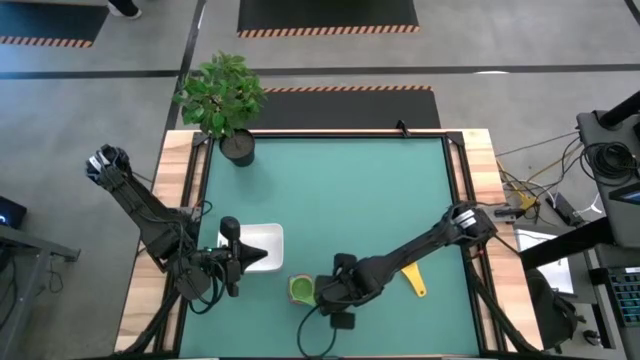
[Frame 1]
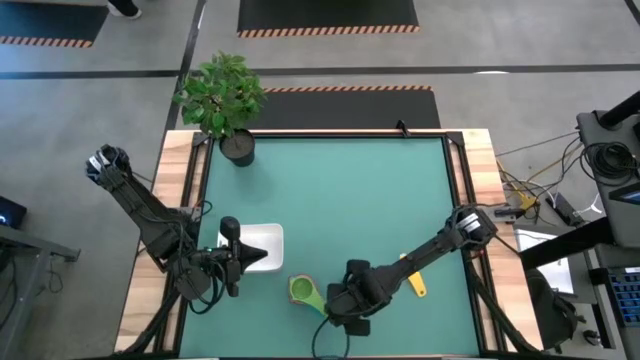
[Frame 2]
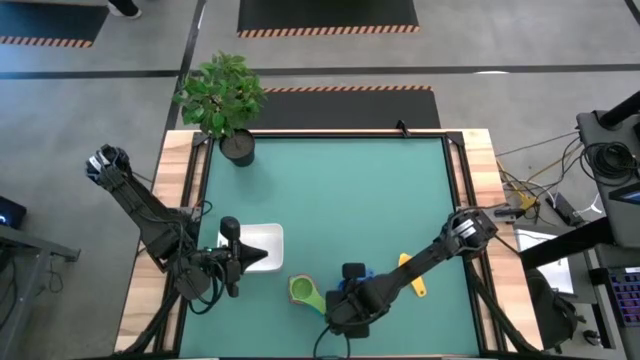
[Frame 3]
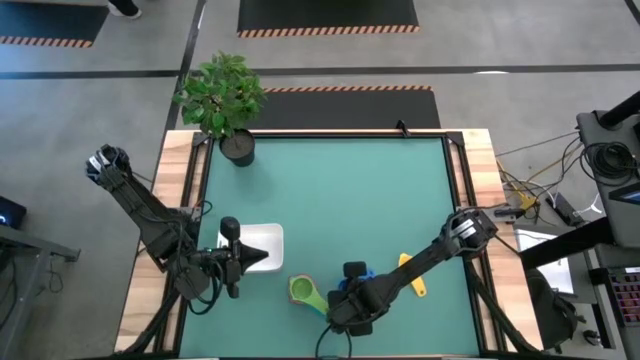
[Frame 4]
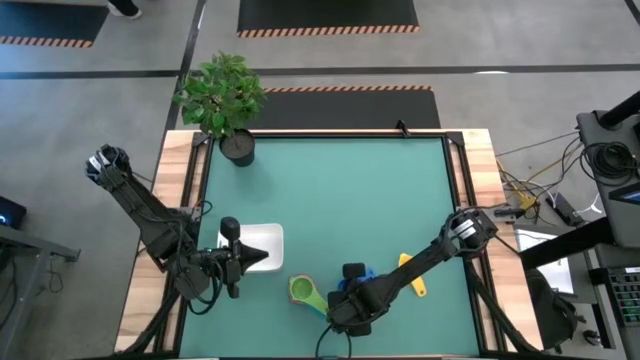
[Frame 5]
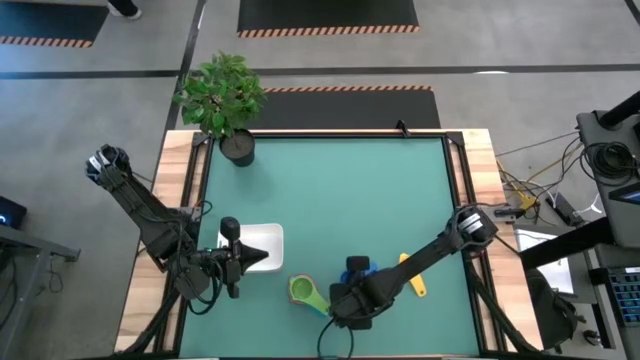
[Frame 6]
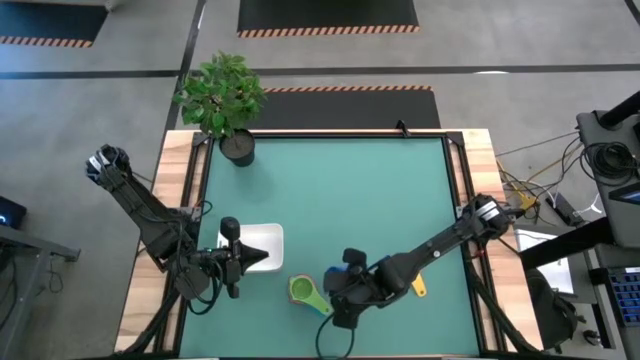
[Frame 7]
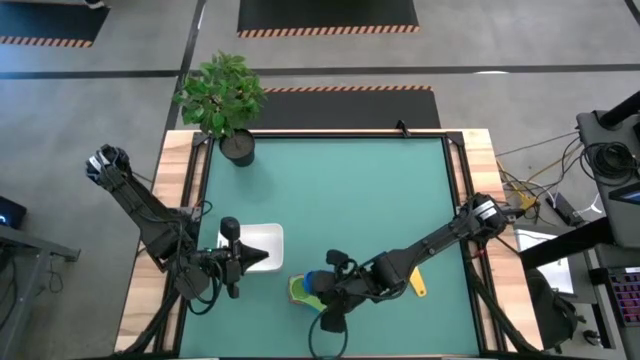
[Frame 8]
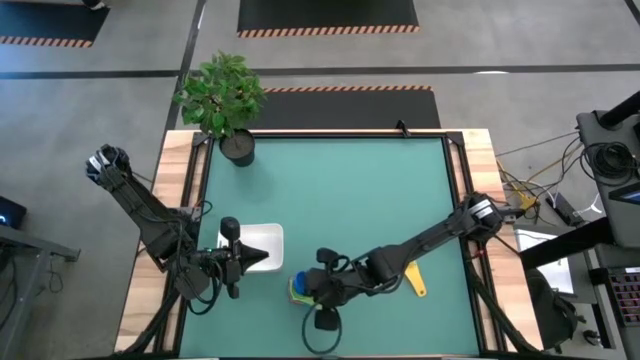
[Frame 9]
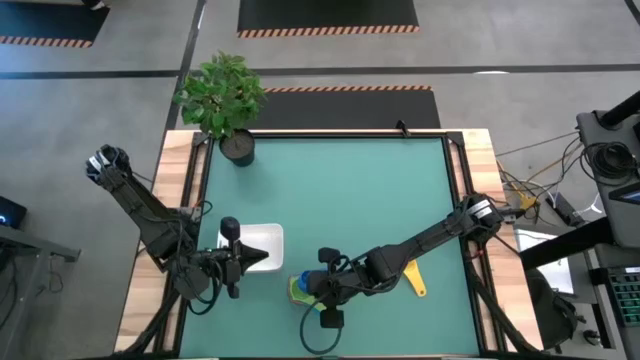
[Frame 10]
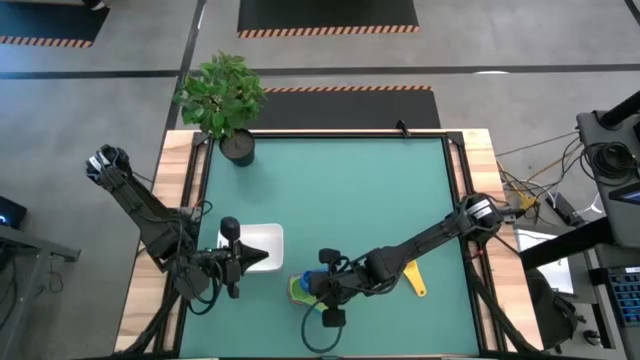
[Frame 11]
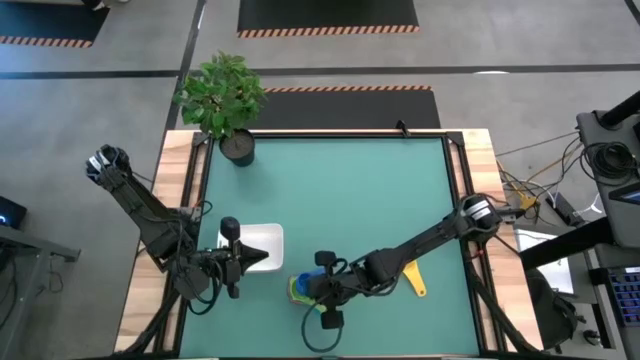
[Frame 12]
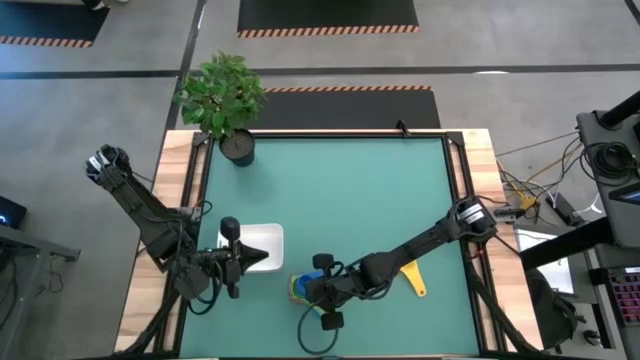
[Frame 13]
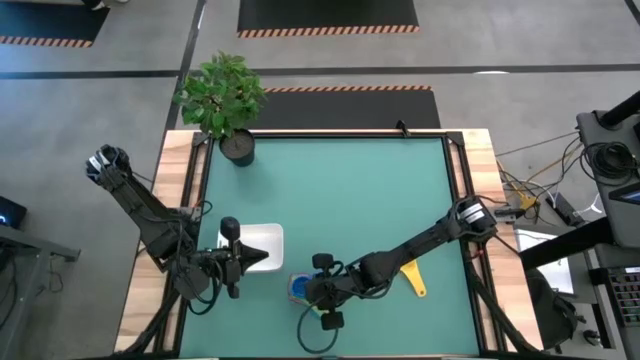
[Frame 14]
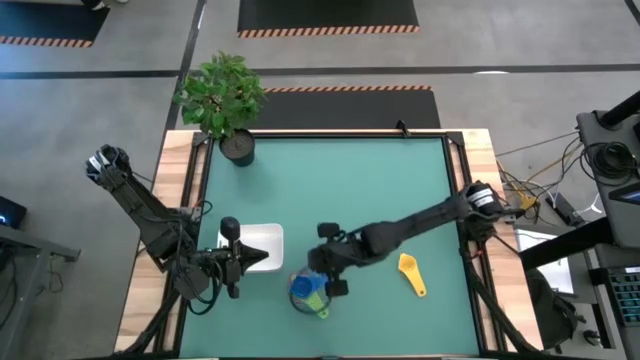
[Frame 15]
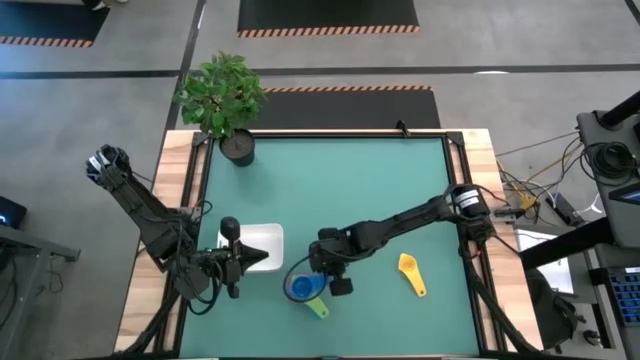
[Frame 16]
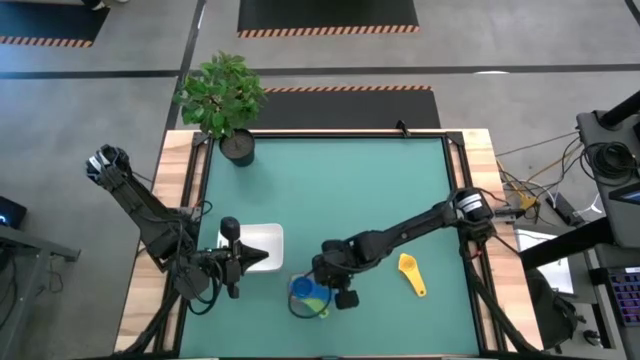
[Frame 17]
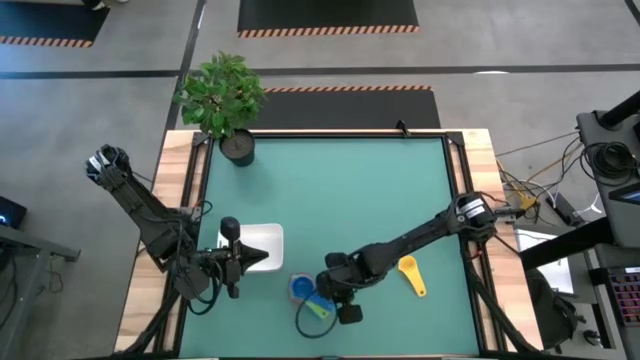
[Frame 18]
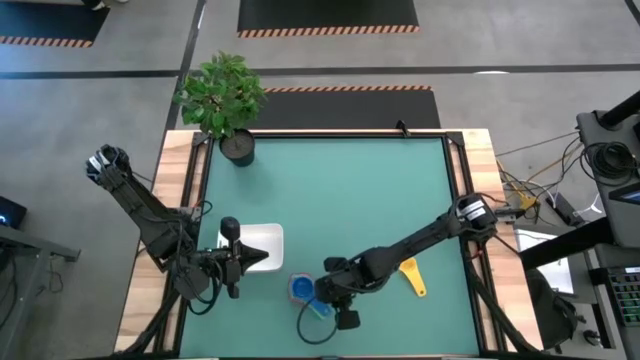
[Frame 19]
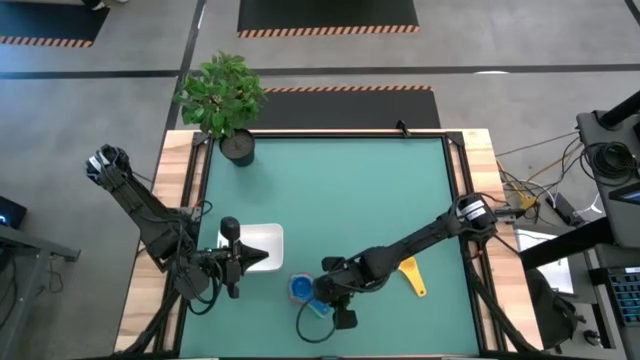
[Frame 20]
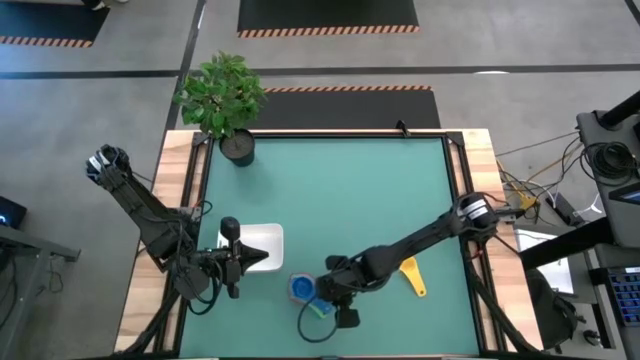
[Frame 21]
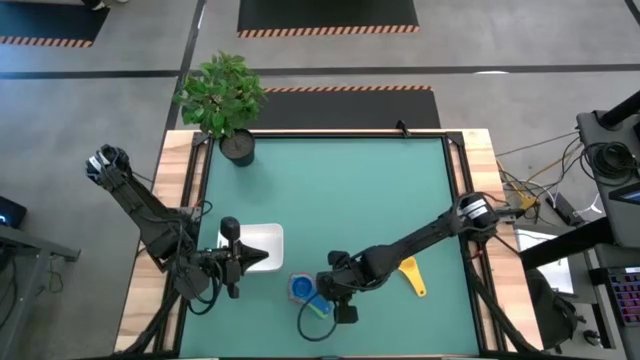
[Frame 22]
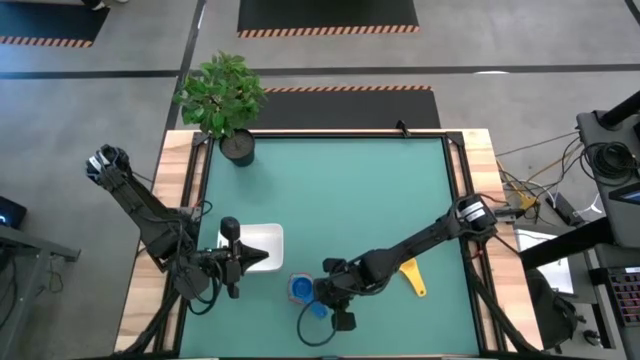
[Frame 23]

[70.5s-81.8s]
Task: Nest measuring cups in basket
Stack the blue measuring cup in the top of the purple measuring cup

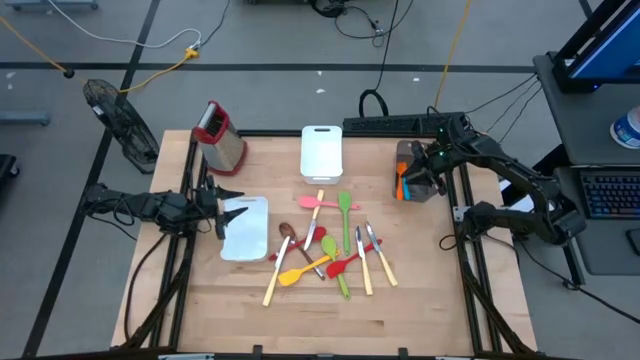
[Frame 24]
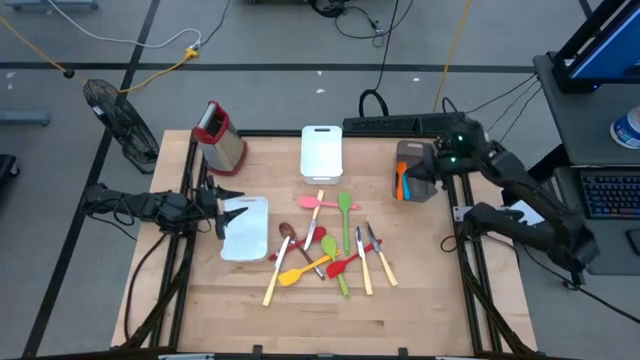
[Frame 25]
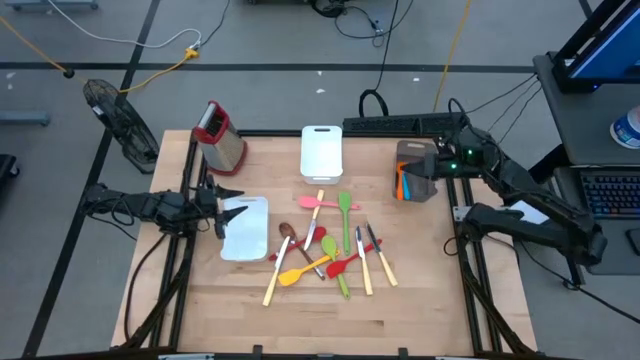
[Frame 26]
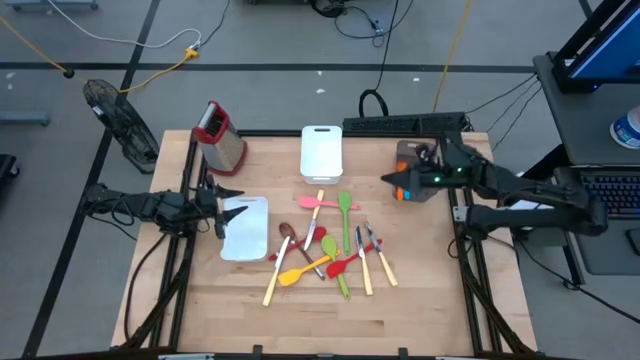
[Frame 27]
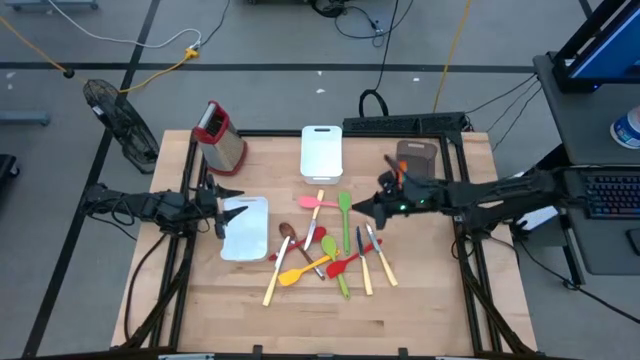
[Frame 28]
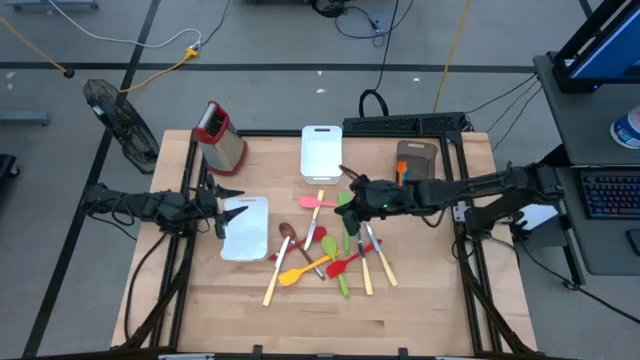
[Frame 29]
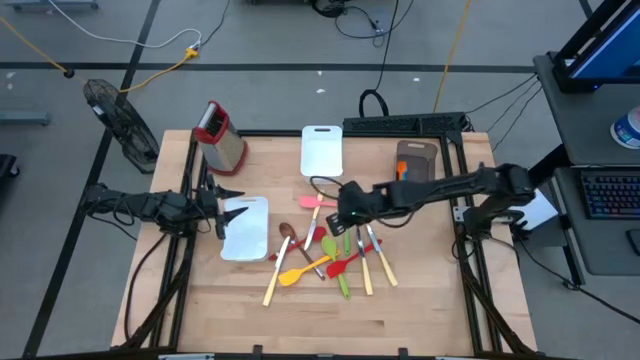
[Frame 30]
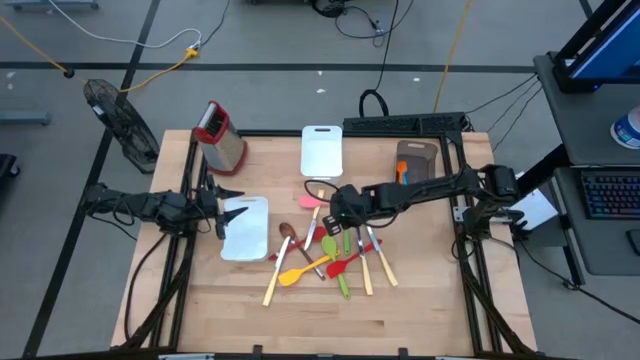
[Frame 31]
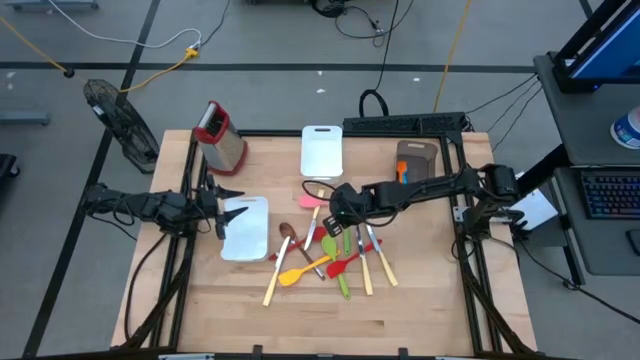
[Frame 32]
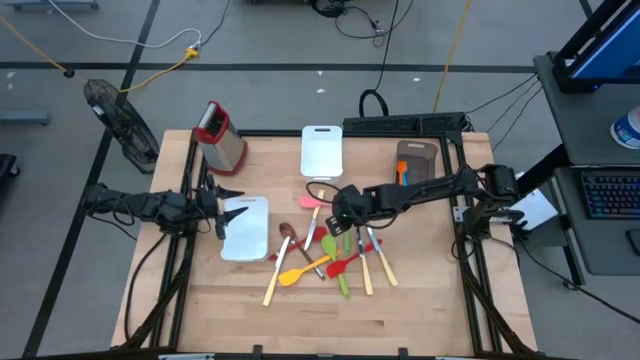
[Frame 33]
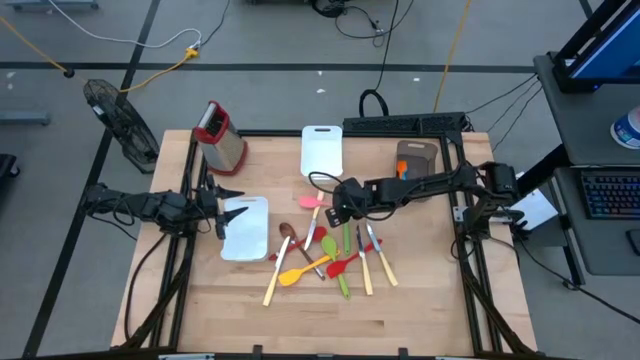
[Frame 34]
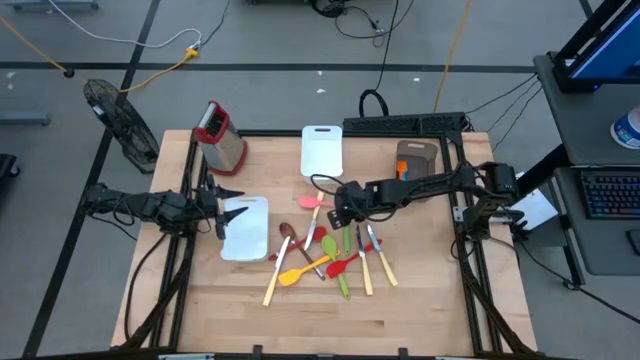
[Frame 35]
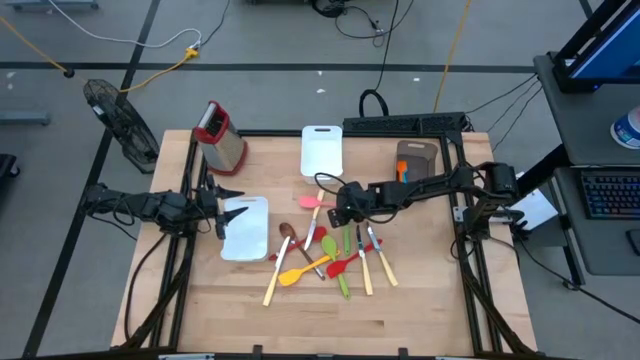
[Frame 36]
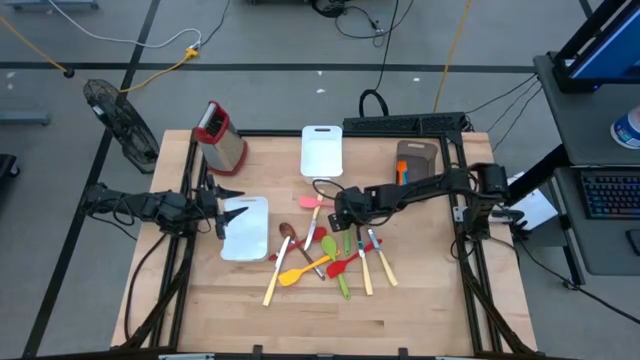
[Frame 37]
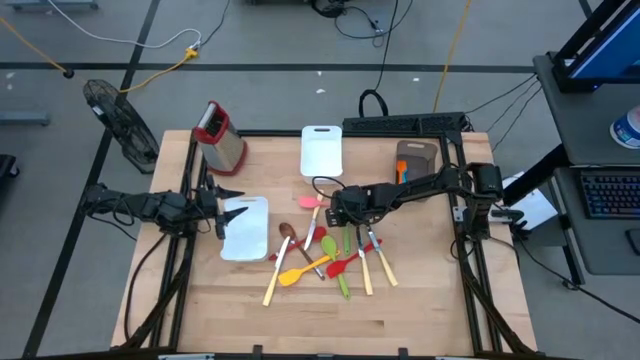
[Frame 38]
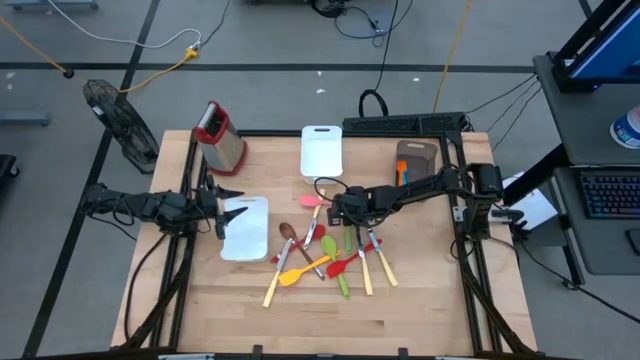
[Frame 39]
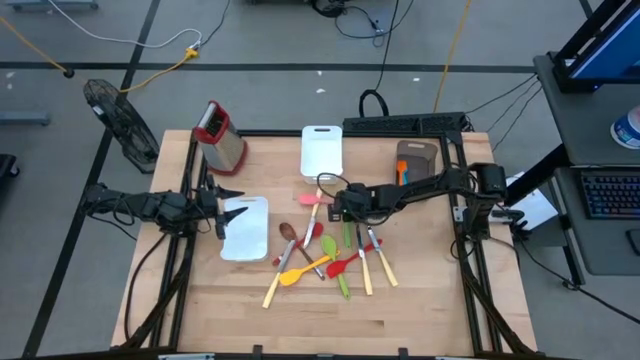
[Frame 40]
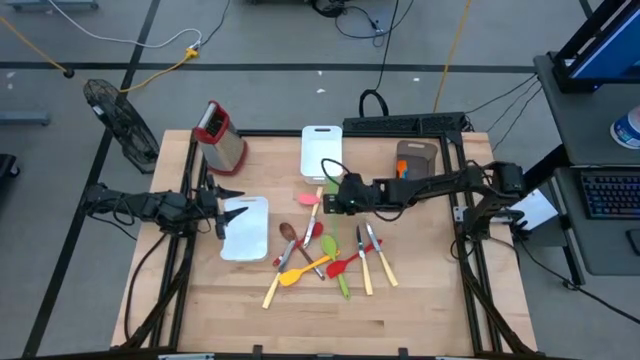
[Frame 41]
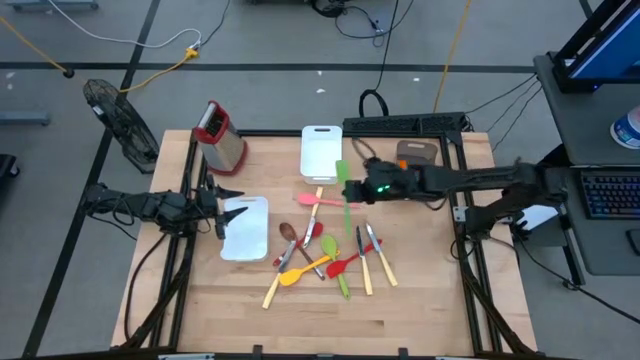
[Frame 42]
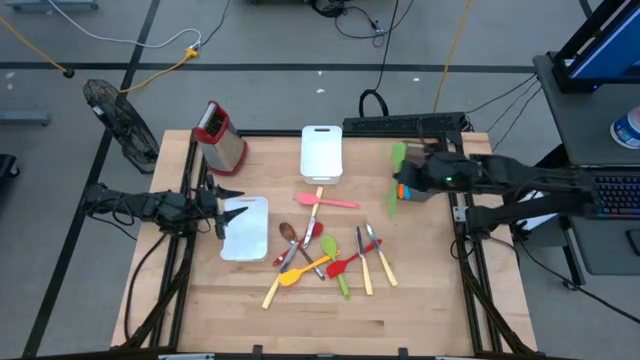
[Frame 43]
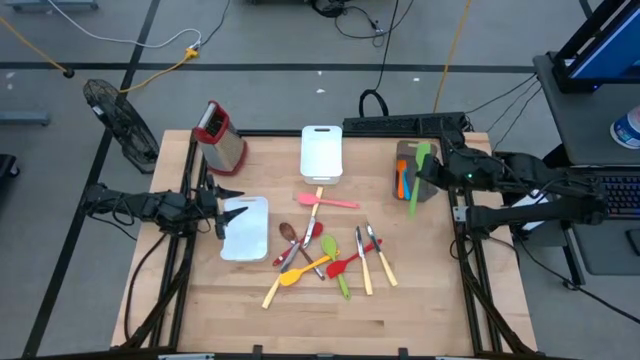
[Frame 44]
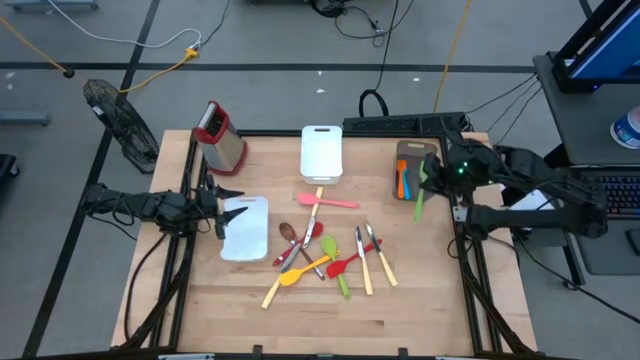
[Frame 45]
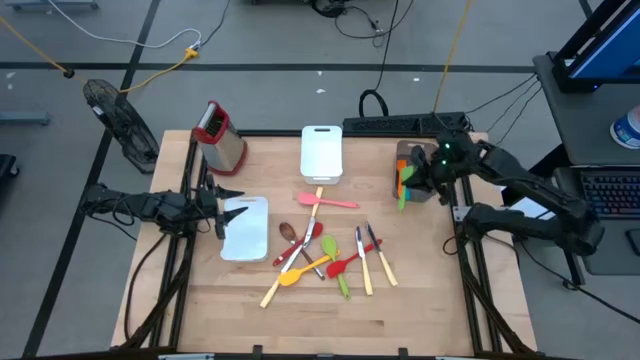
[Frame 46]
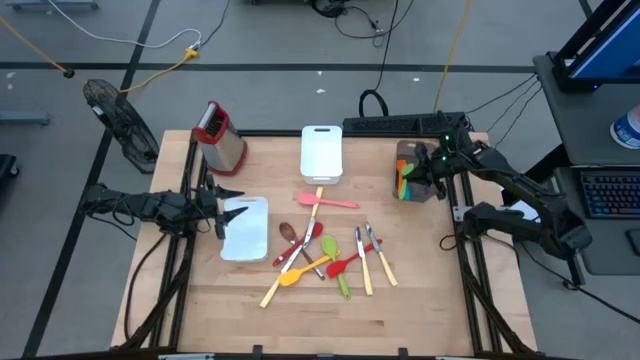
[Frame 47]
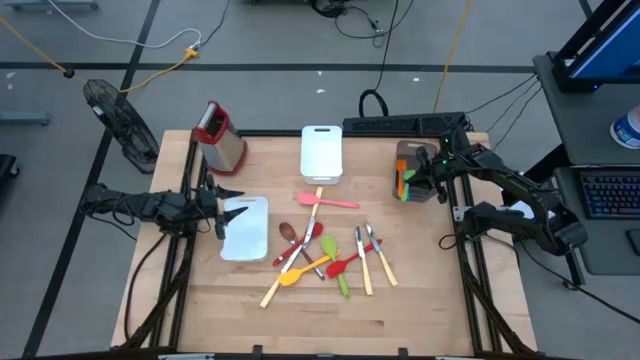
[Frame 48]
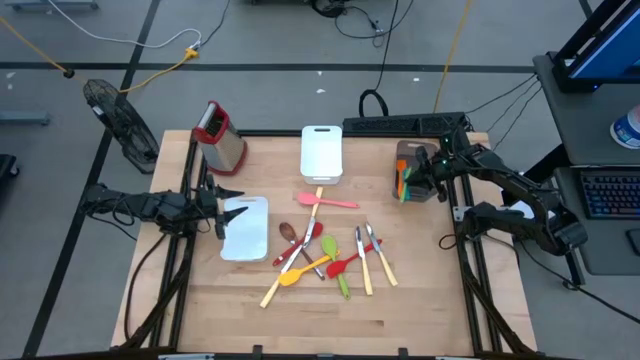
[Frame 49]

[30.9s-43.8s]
Task: Pick & Place Kitchen Items
Put the green spatula into the black bin
